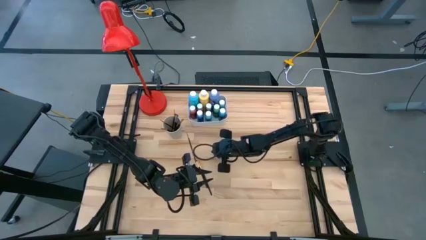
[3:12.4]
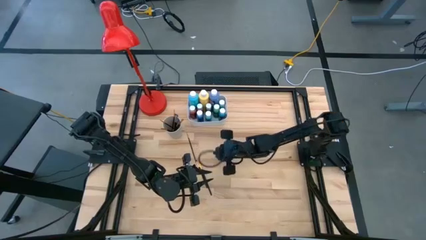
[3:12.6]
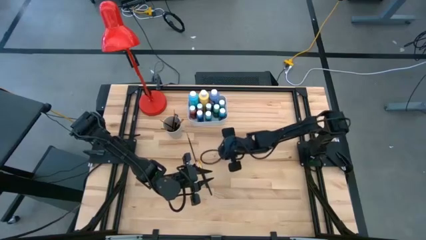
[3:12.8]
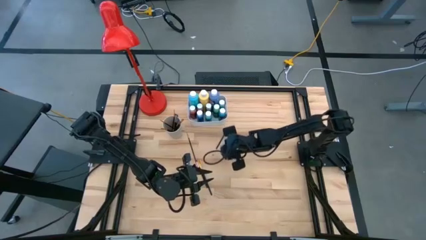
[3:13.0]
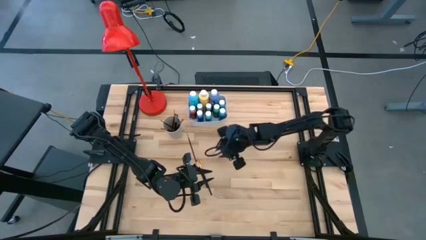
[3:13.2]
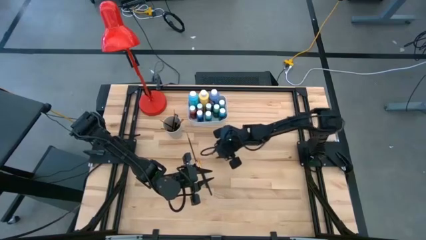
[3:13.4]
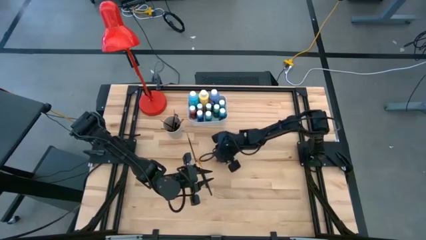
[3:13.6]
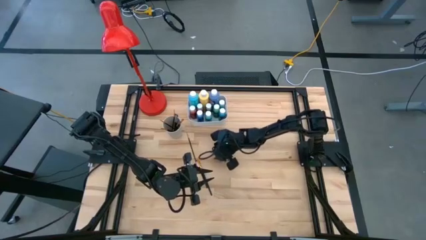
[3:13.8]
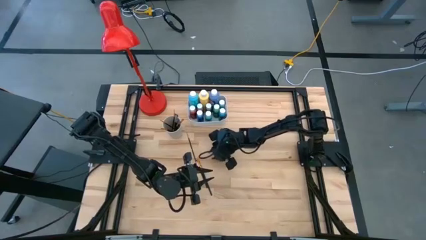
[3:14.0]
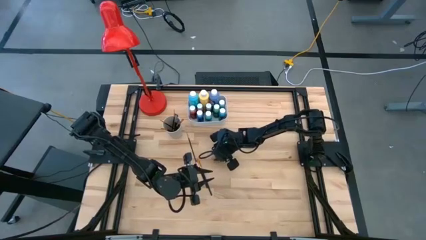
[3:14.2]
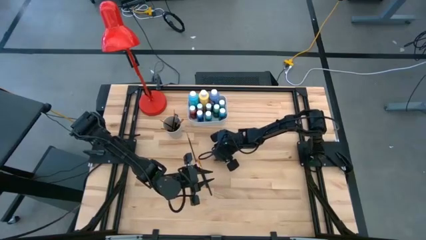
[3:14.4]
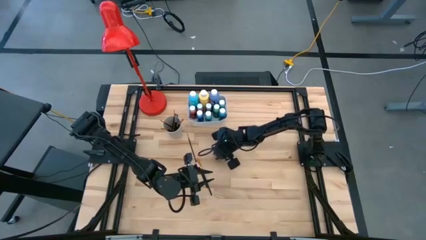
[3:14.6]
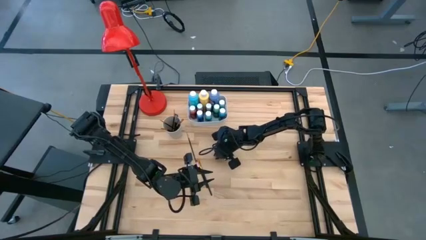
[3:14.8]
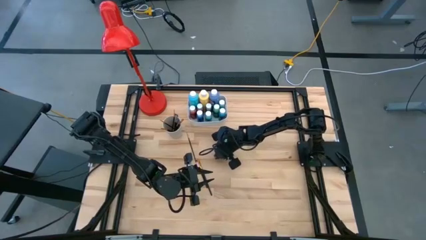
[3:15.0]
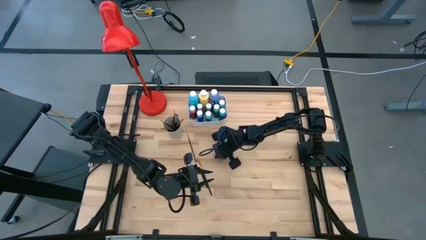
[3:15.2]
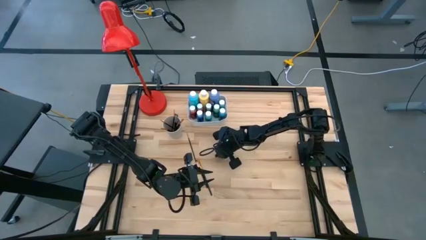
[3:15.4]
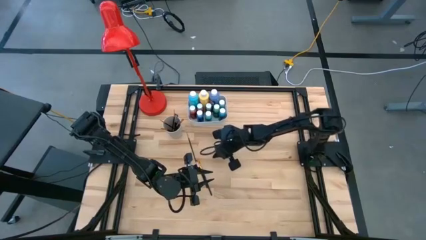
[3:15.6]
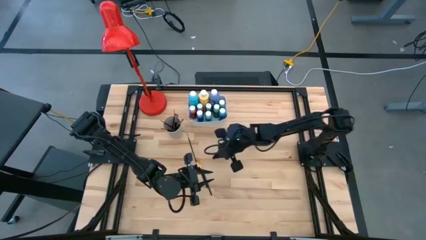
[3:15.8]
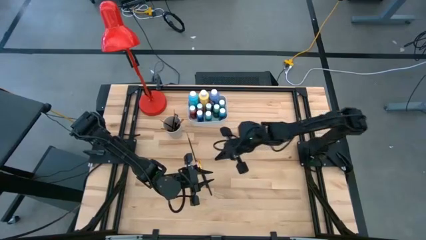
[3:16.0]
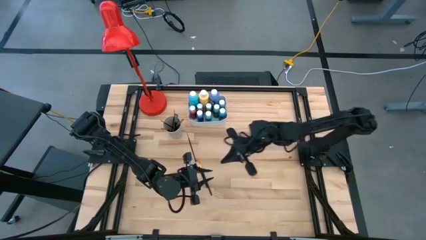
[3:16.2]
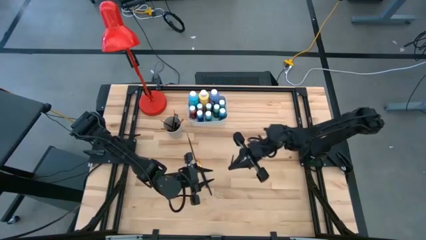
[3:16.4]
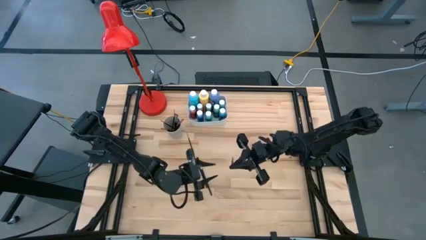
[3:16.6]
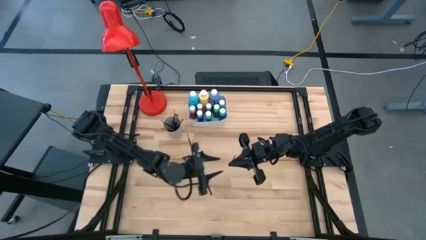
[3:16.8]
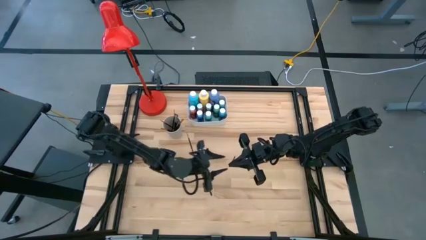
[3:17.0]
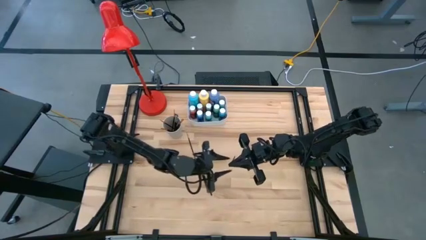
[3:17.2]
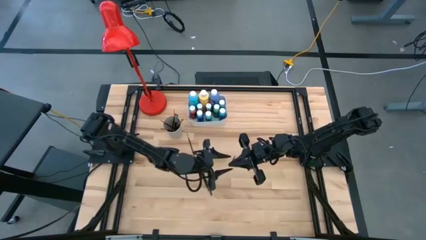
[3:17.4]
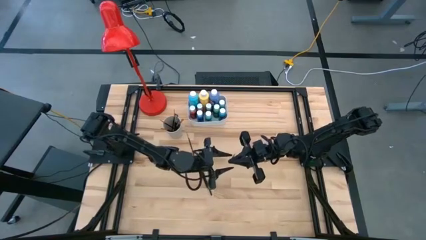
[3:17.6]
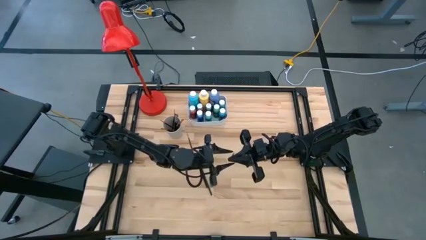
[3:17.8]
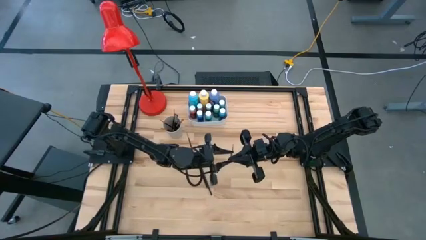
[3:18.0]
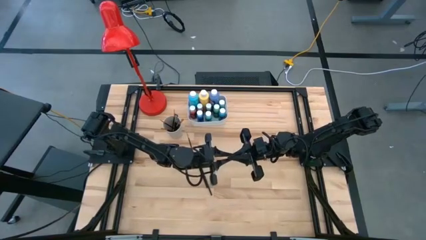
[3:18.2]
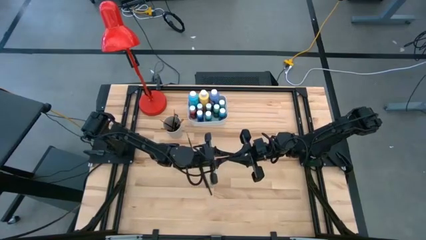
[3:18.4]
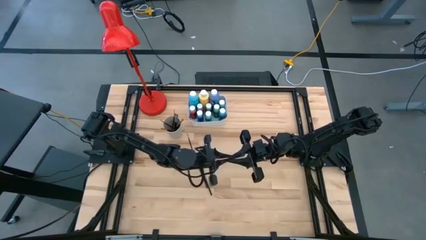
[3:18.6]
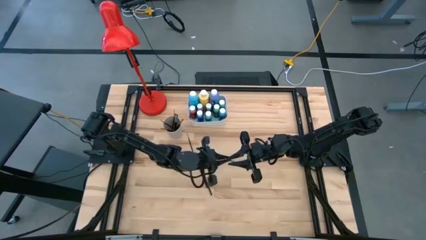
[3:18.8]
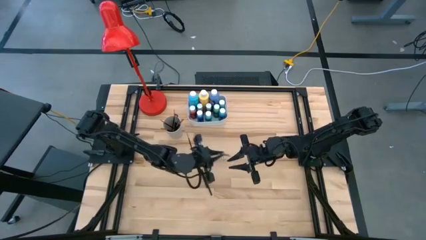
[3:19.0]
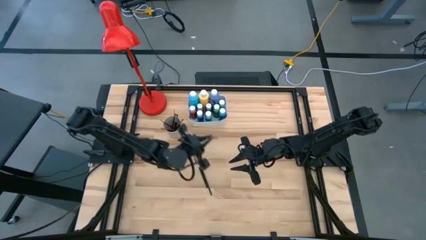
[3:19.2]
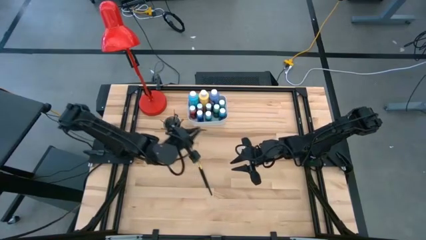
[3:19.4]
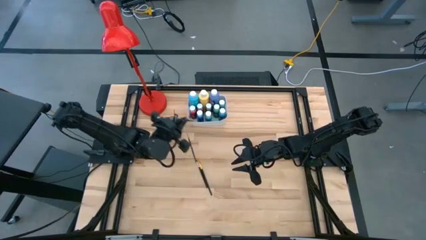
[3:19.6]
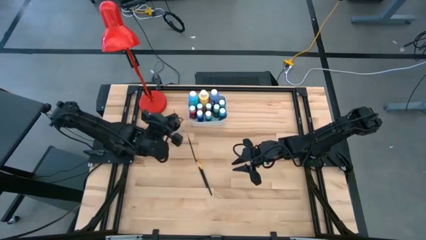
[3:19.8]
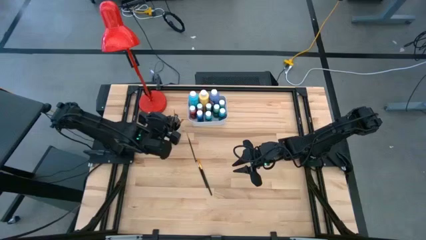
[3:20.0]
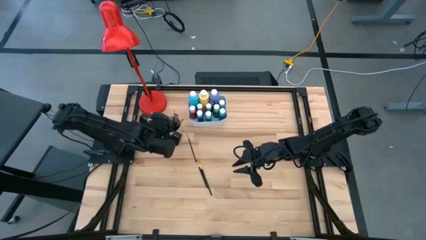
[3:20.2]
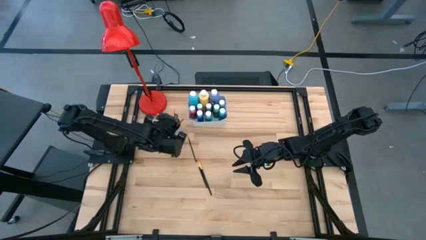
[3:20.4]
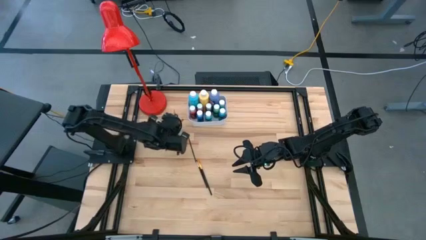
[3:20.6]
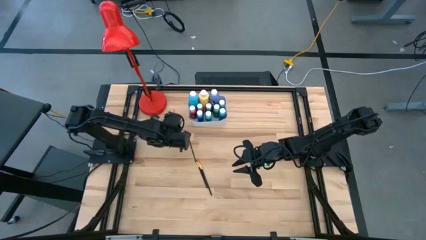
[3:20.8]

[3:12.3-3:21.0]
Task: Pick & Place Paint Supplies
Put the black paint brush into the white cup

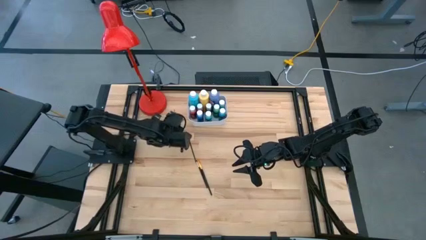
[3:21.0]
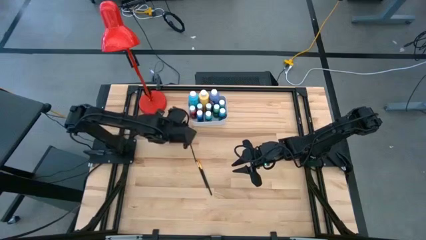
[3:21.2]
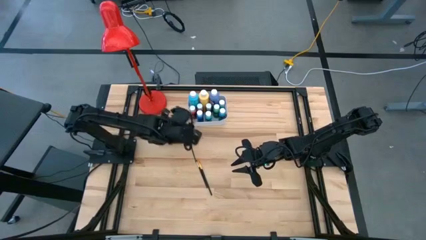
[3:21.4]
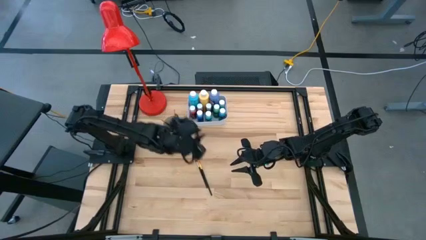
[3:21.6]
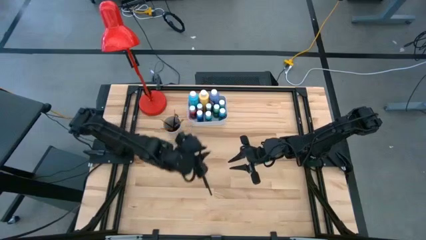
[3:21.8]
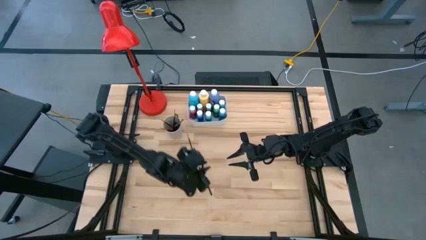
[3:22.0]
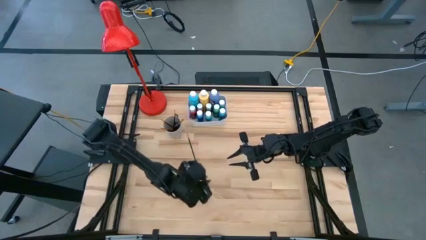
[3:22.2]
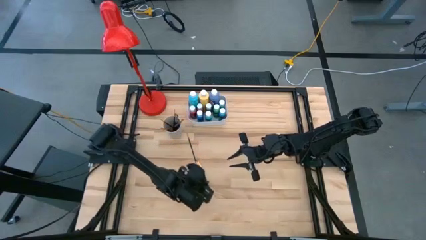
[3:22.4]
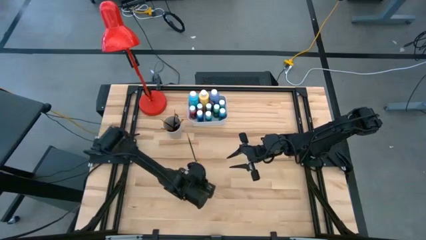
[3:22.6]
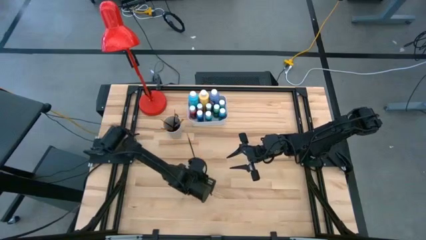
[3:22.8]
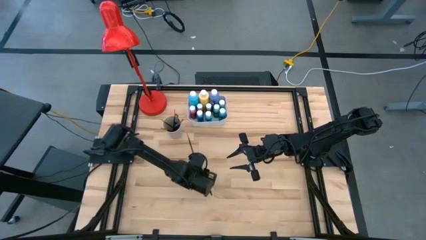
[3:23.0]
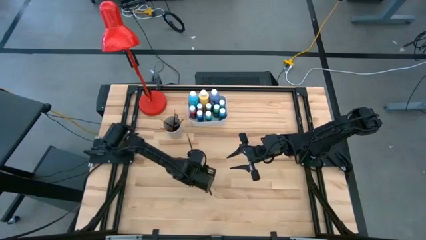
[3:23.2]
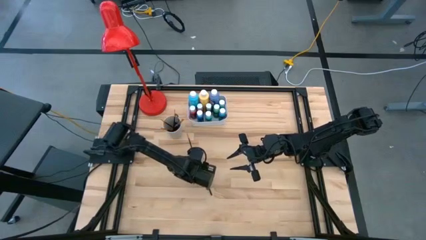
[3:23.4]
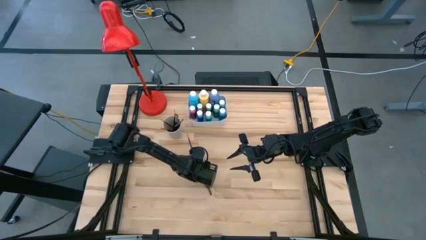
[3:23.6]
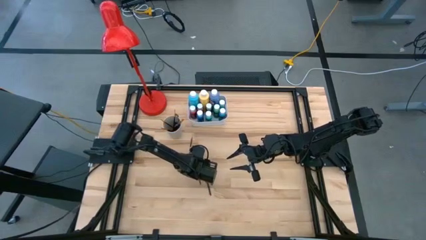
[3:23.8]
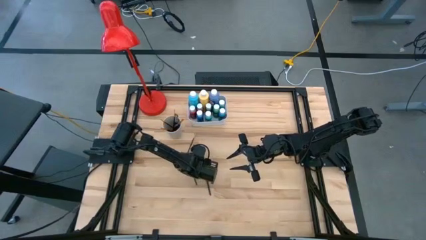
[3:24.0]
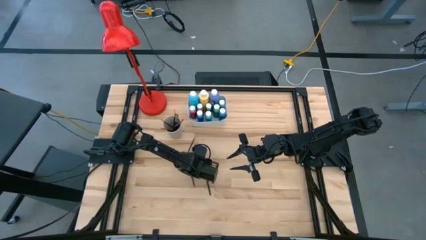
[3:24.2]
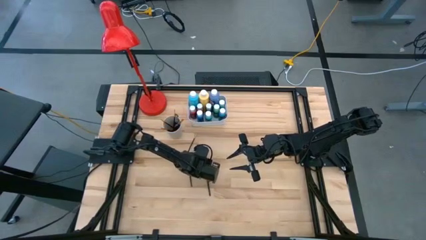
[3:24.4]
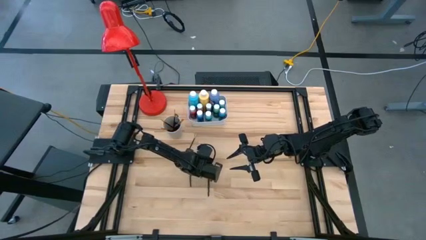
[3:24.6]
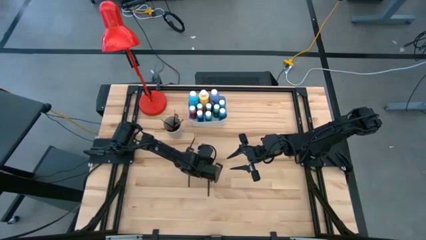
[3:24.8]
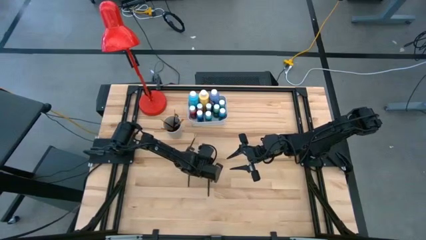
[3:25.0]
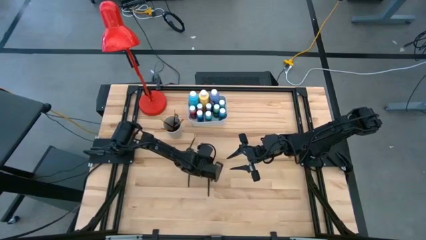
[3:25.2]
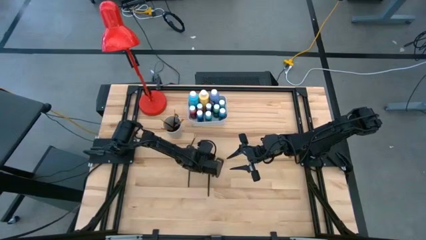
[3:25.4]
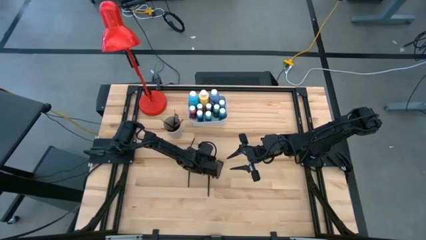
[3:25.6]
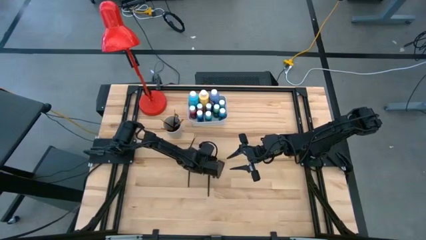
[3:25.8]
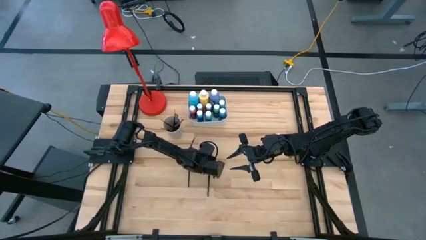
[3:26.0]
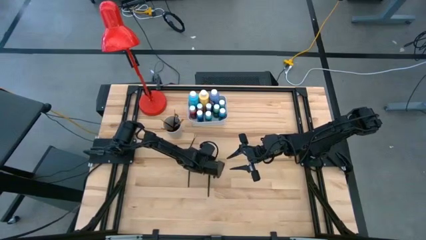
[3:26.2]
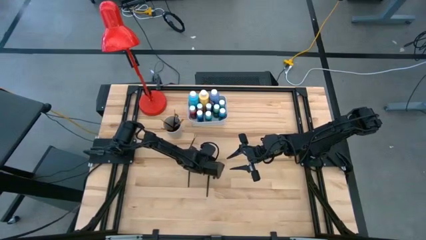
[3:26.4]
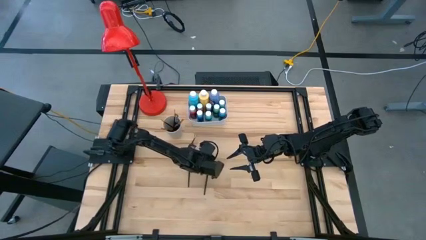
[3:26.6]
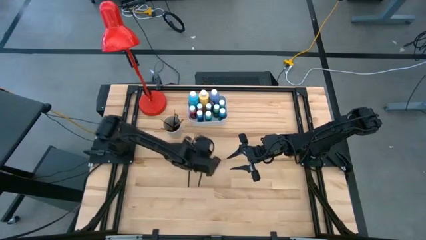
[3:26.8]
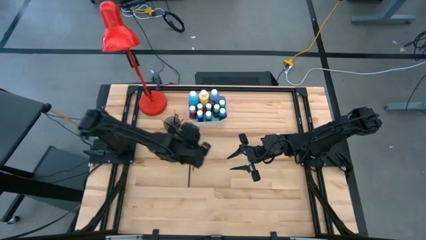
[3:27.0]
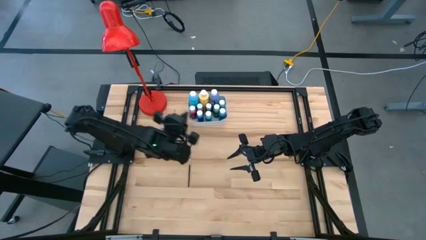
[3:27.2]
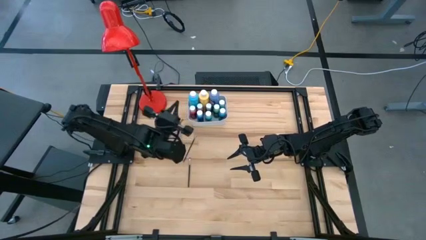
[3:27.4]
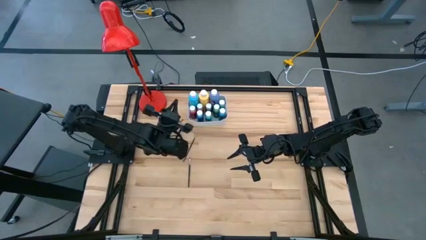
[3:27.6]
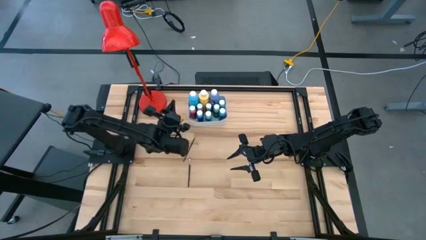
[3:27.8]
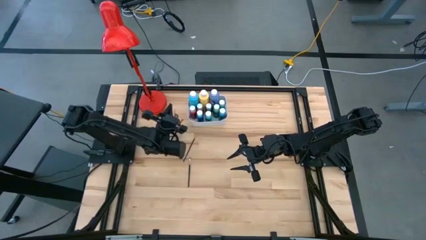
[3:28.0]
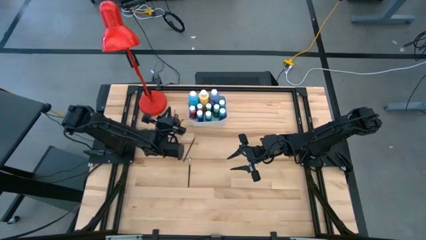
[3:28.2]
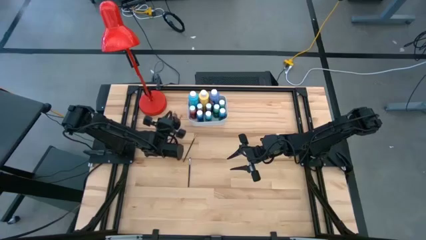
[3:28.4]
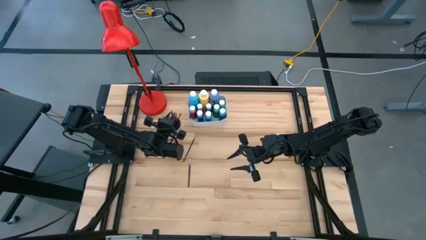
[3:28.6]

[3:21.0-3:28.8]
Put the black paint brush into the white cup
